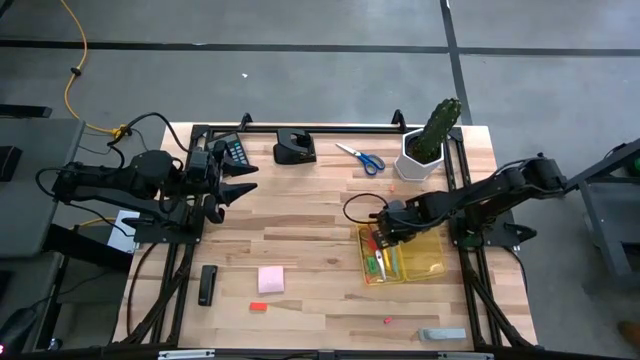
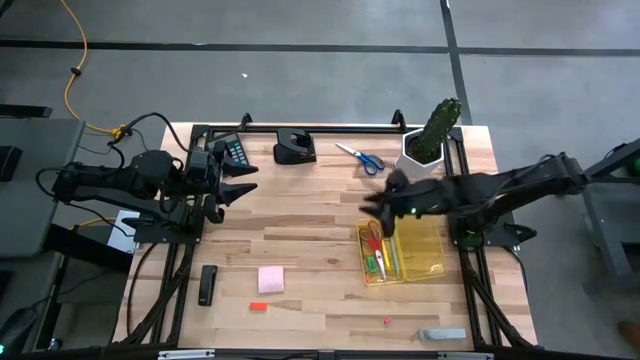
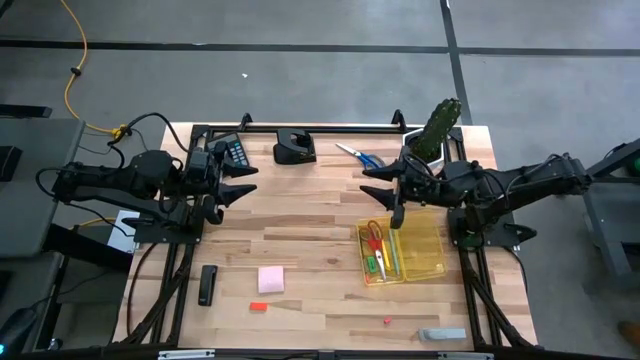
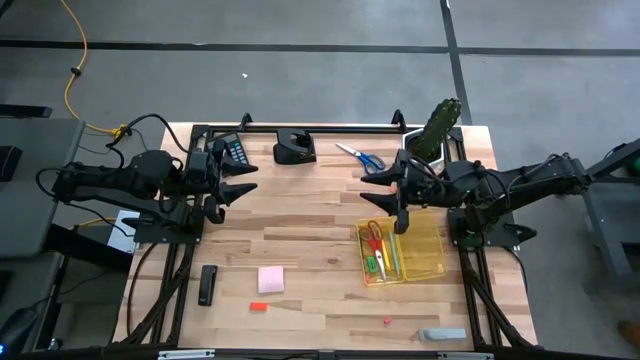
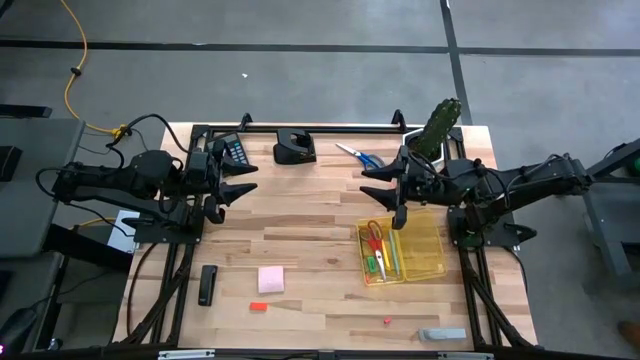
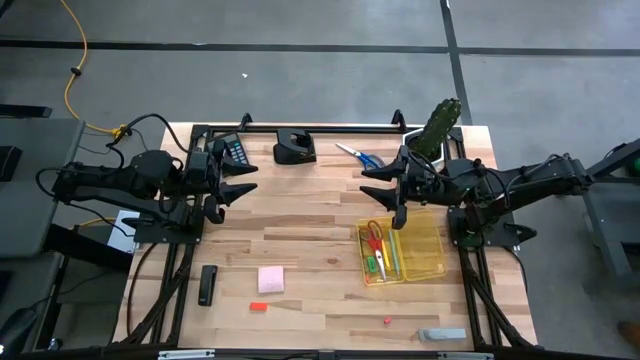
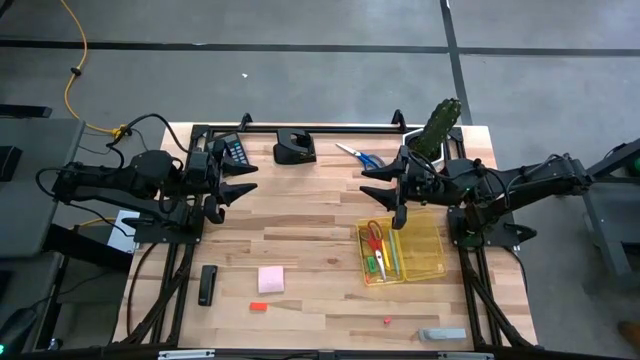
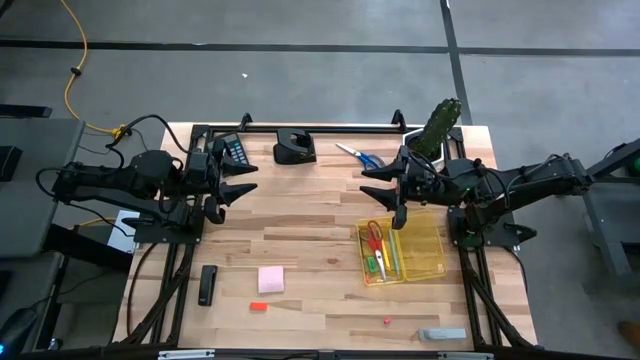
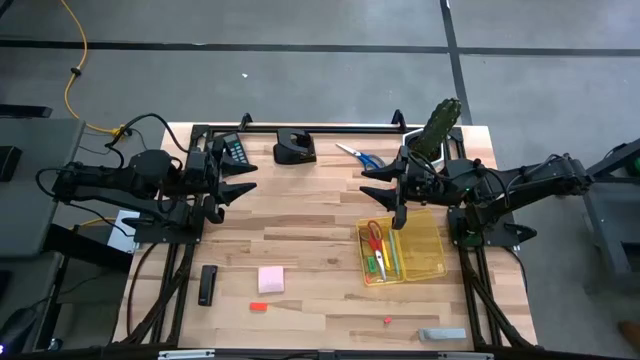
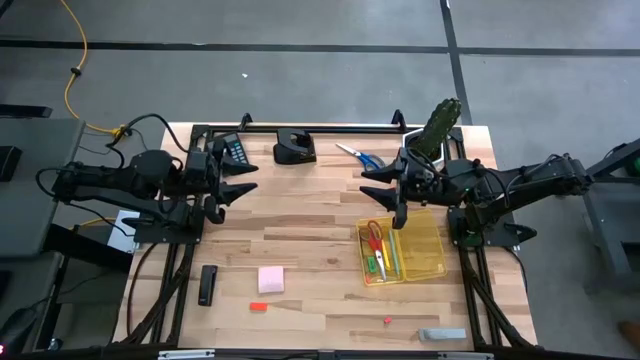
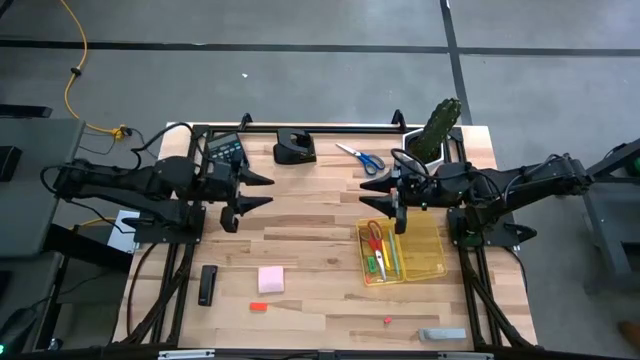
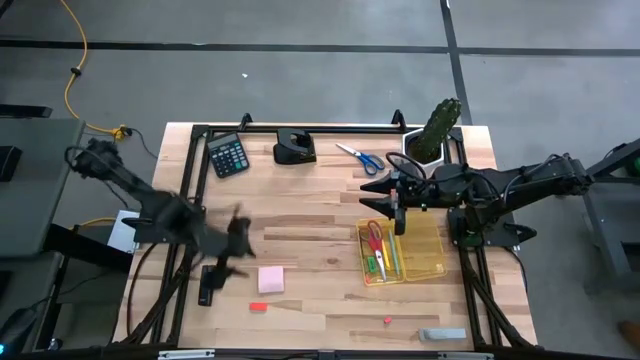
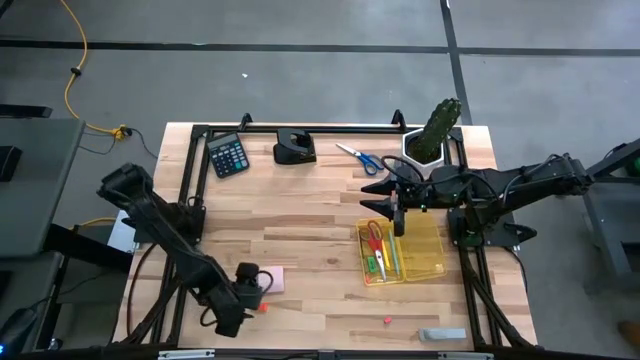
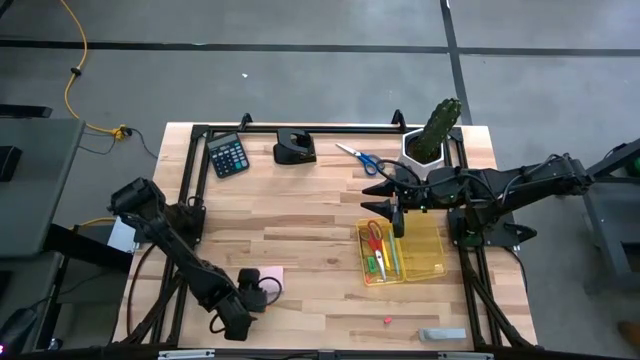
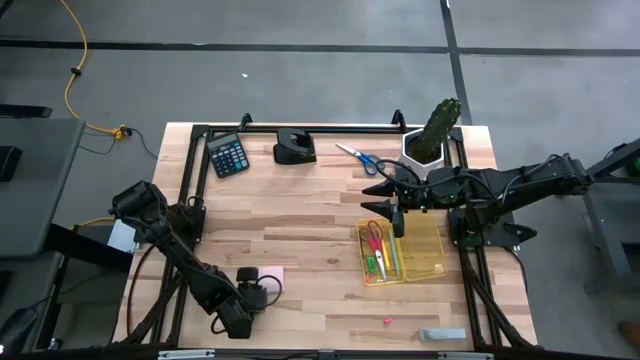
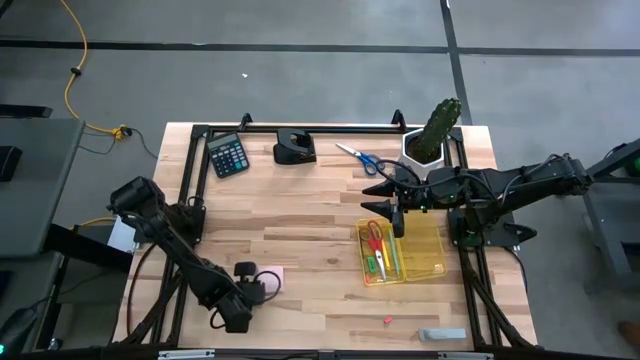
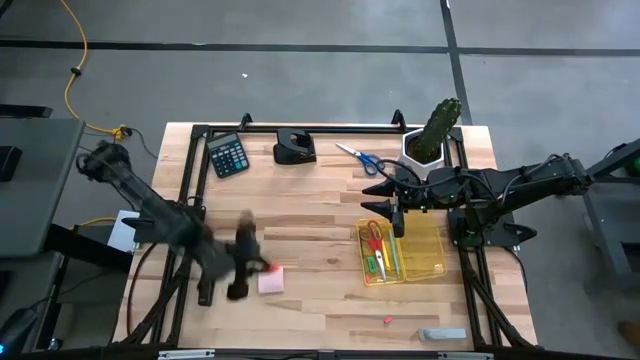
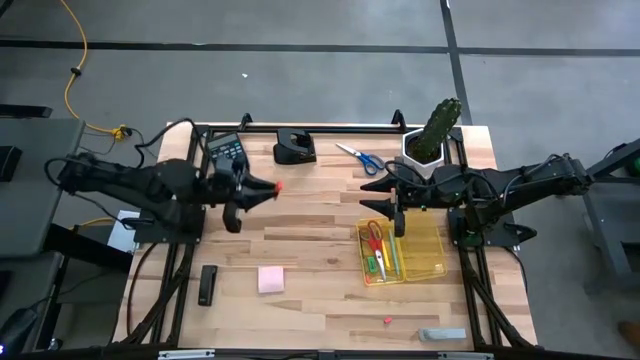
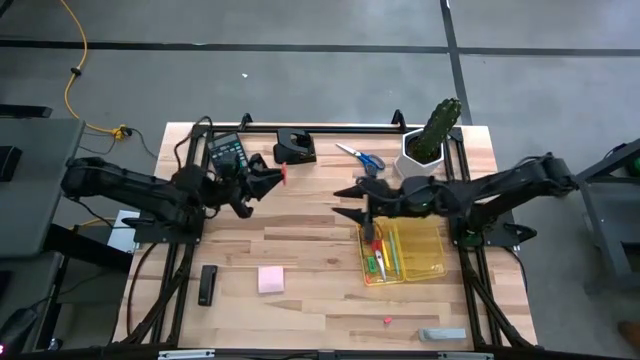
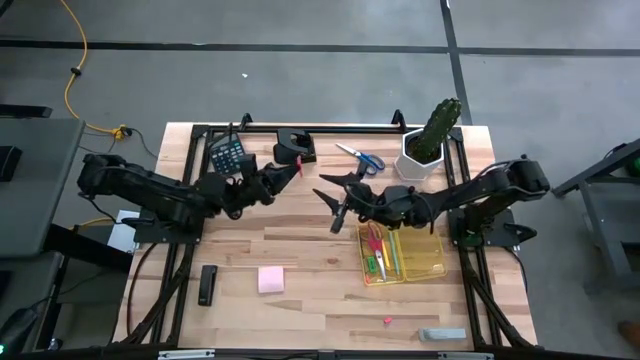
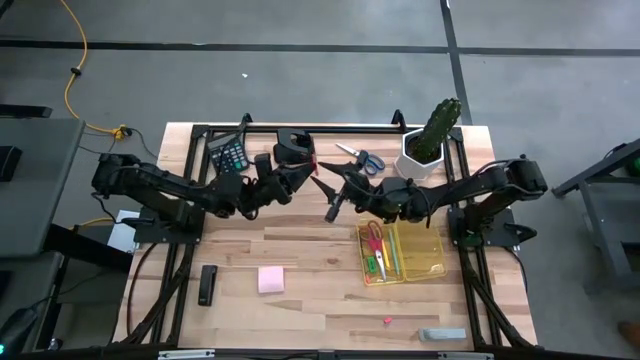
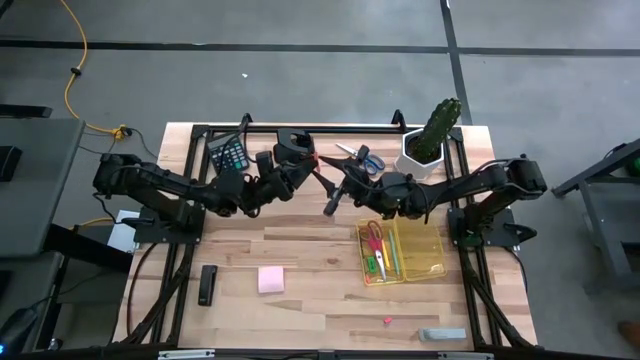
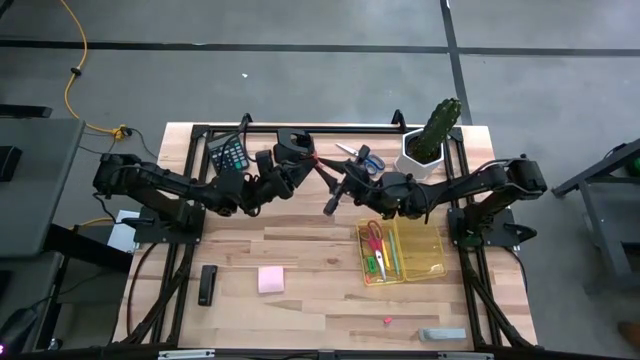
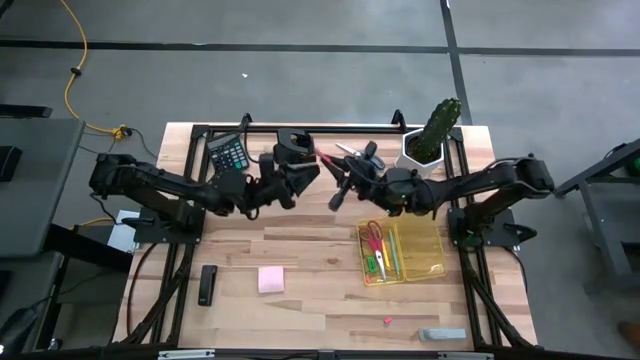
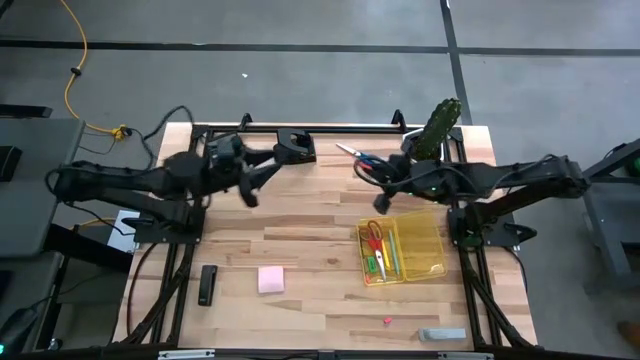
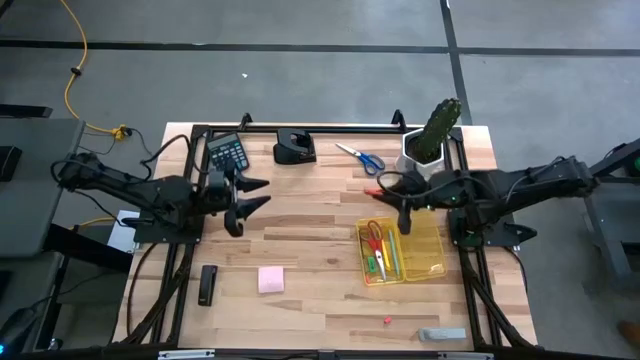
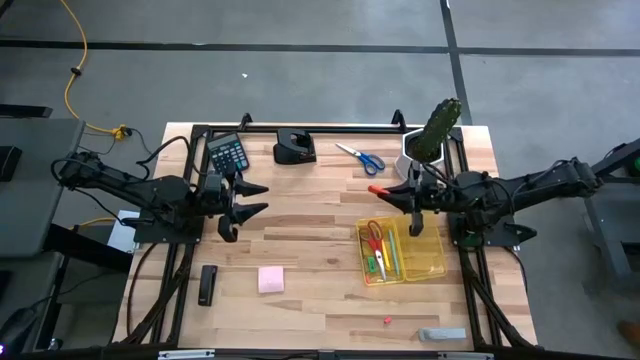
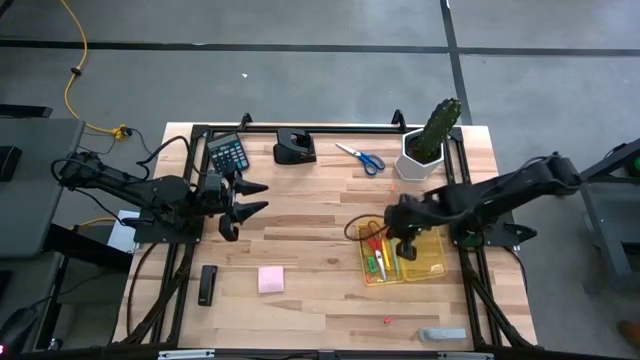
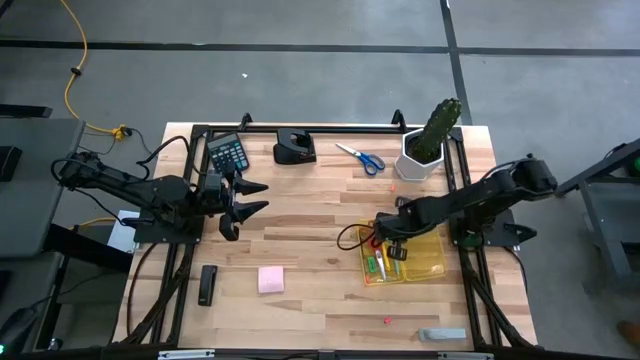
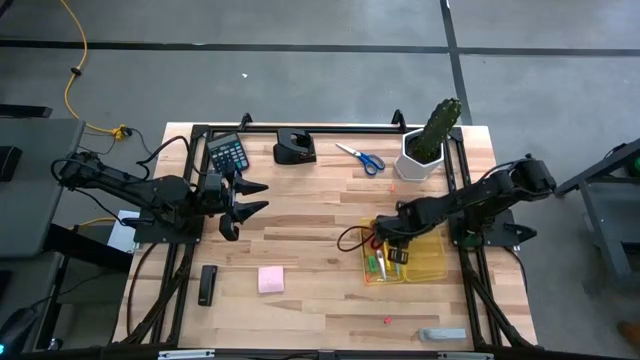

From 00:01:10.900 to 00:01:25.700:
Task: Pack school essentials
Put the orange eraser into the yellow box

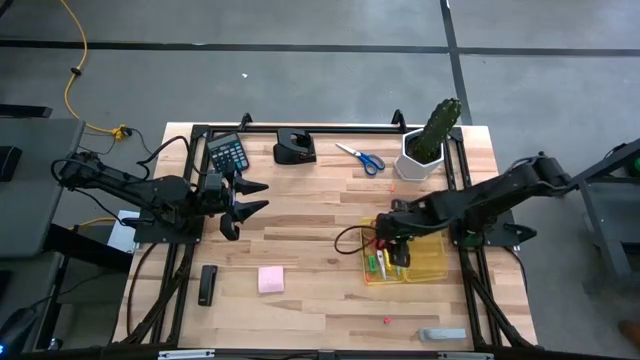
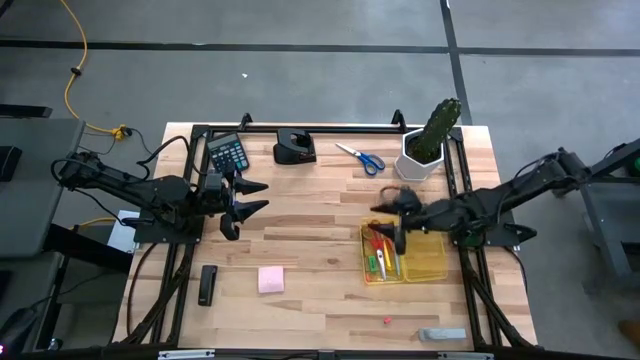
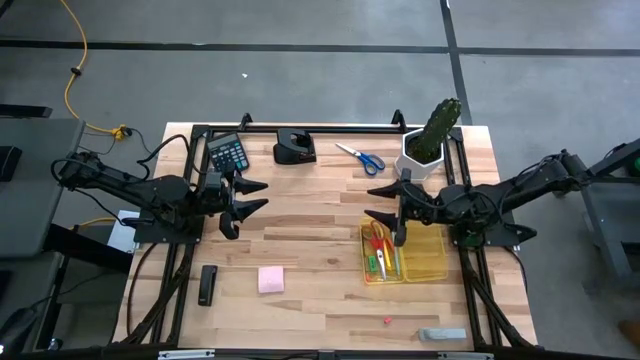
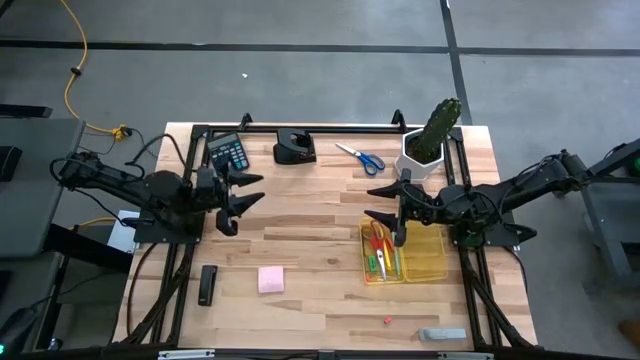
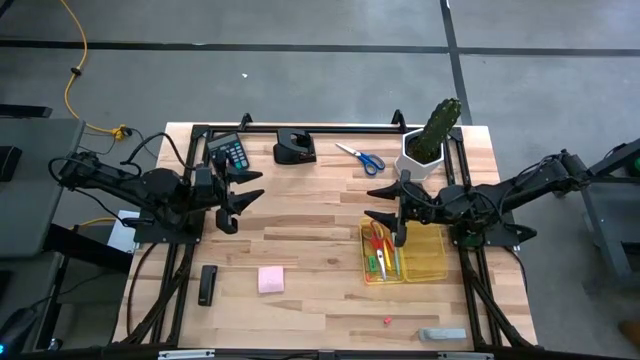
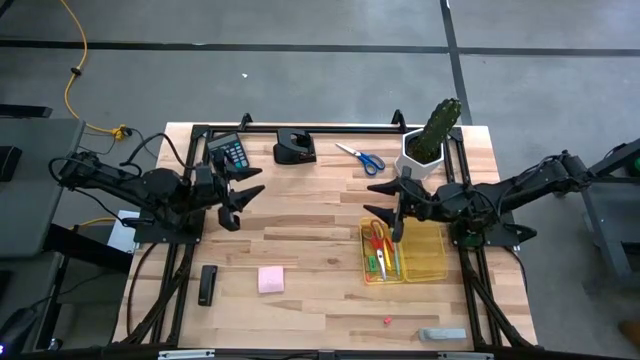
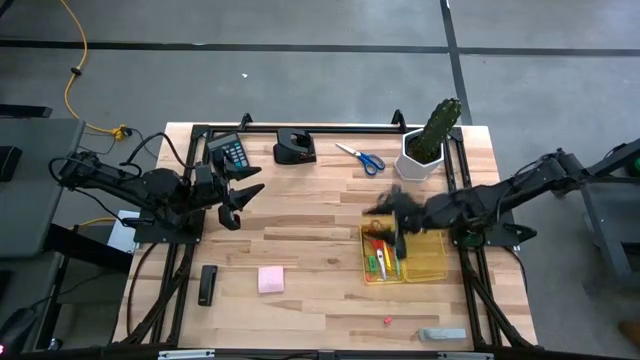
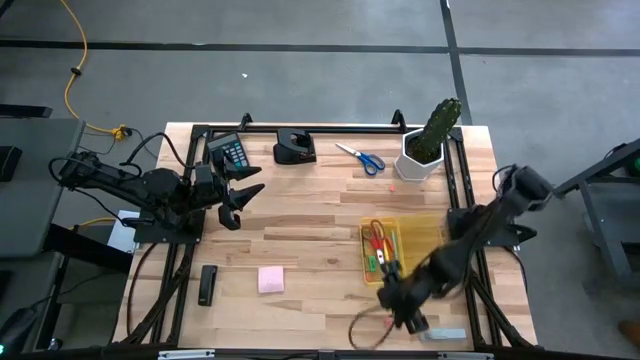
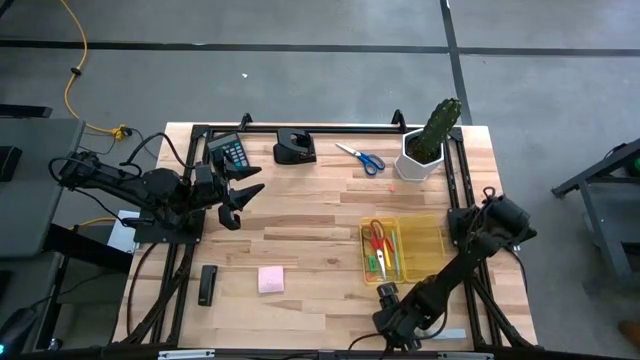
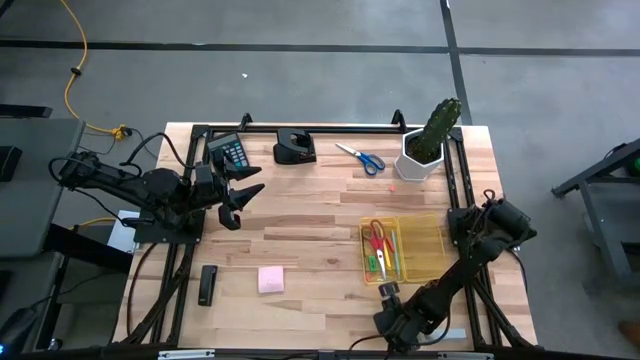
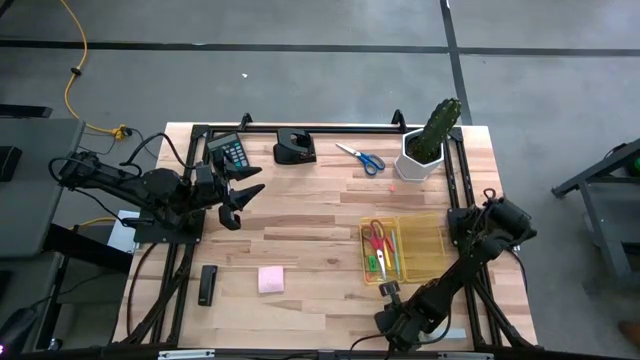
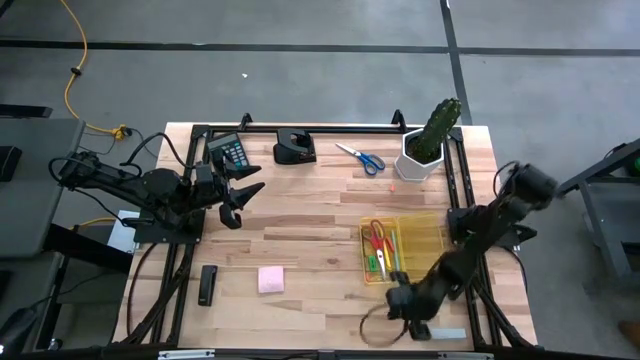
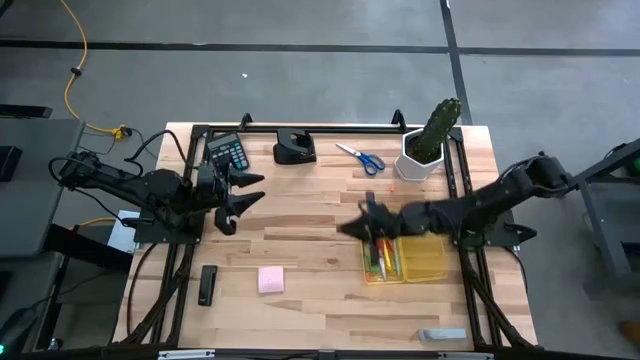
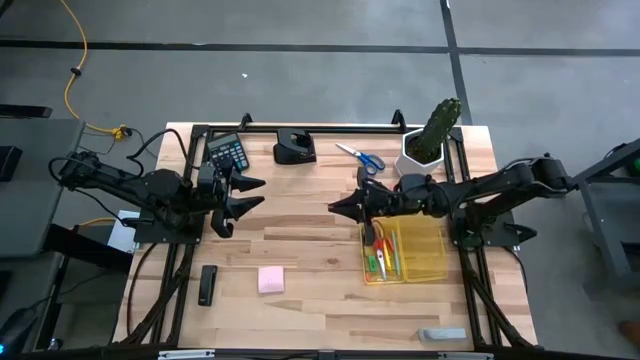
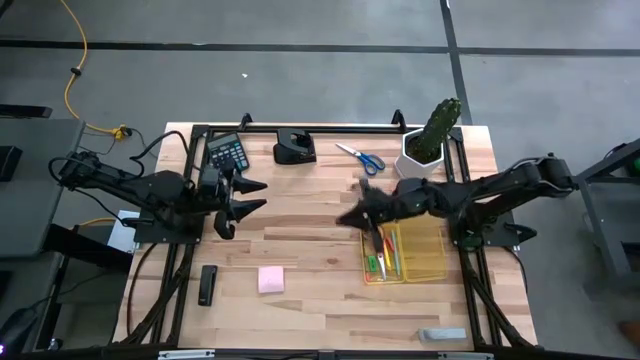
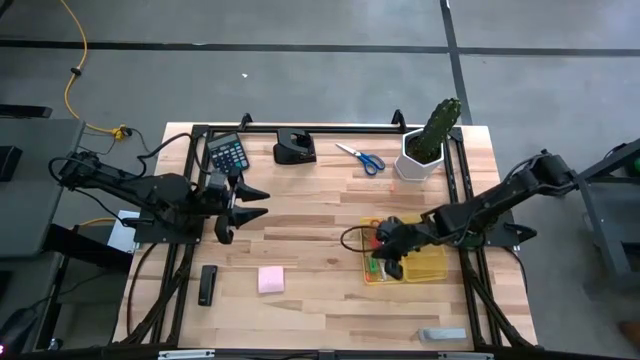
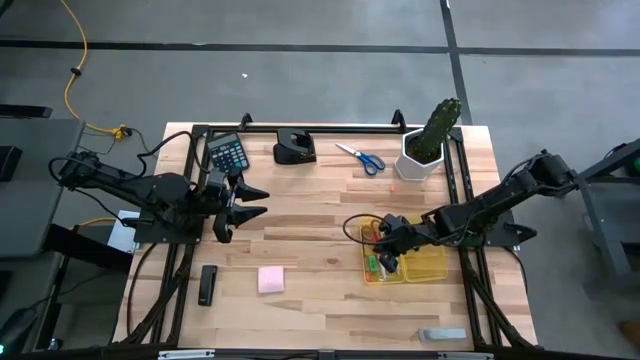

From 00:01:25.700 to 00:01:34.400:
Put the pink eraser cap into the yellow box
